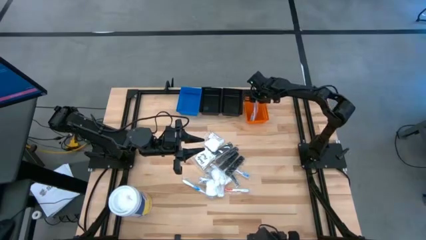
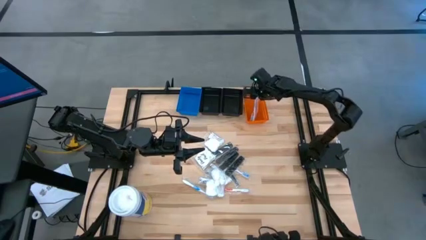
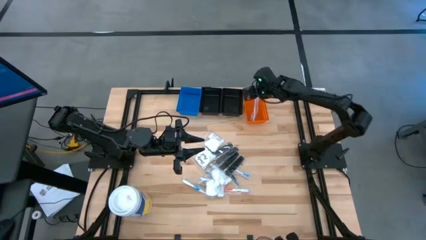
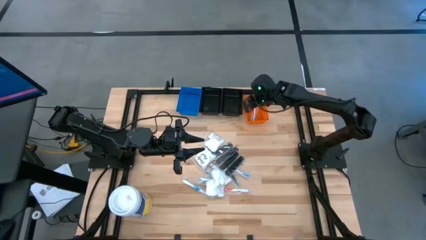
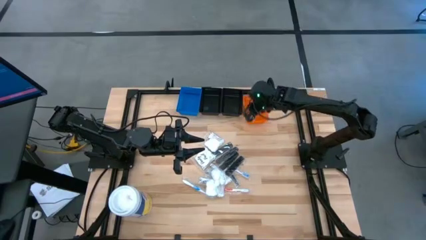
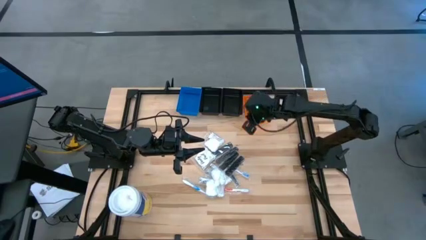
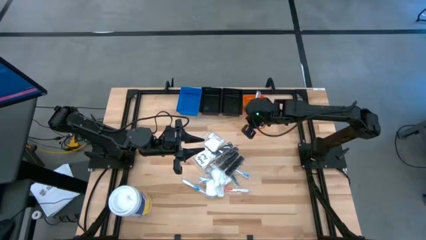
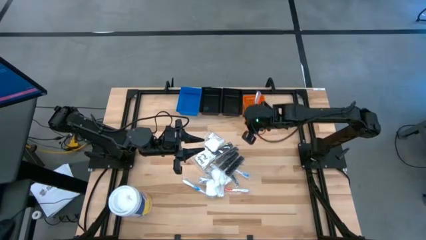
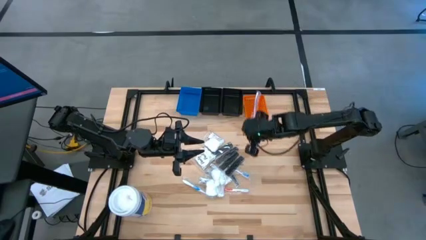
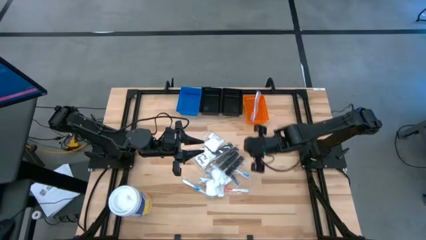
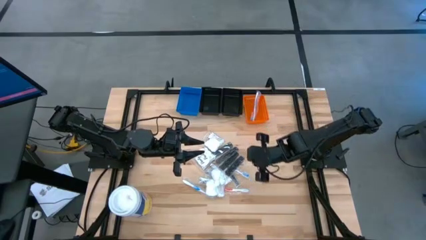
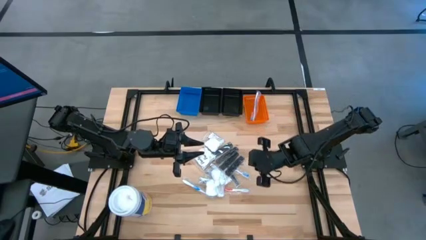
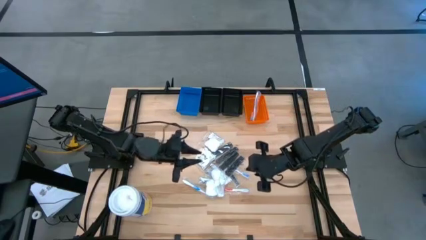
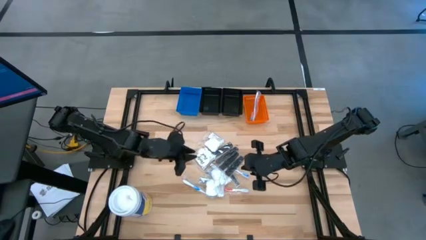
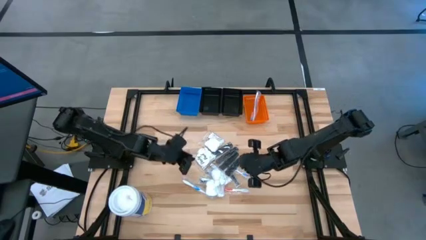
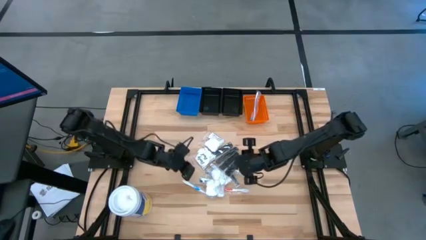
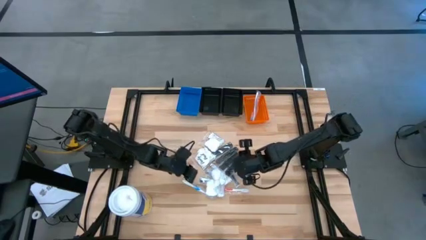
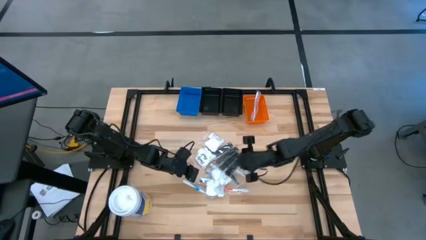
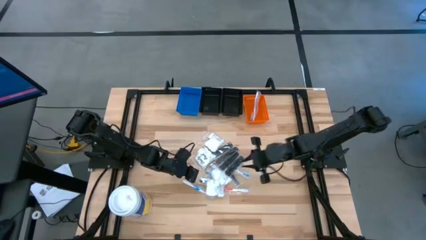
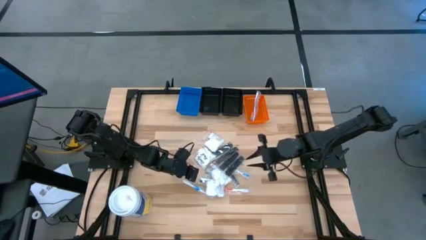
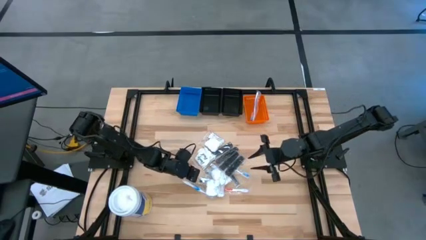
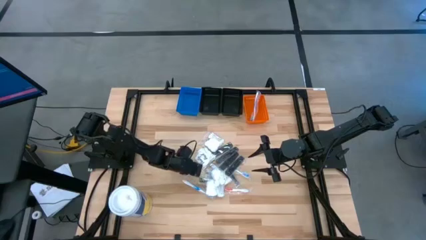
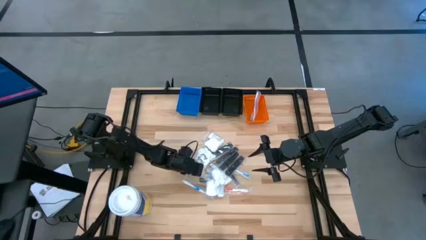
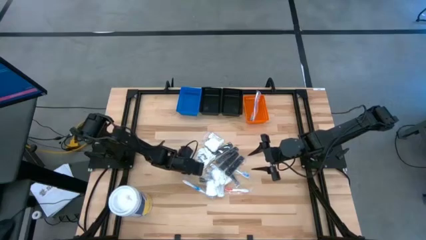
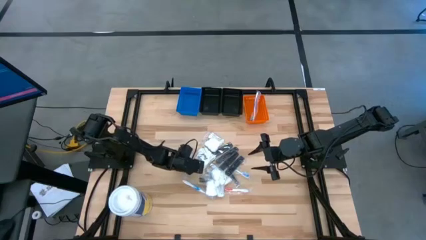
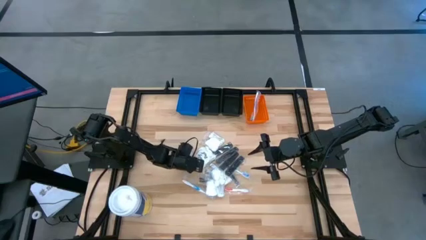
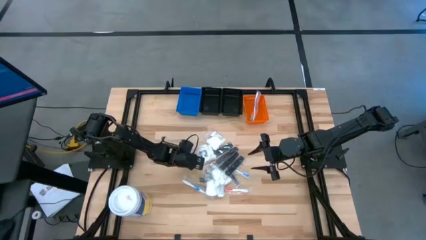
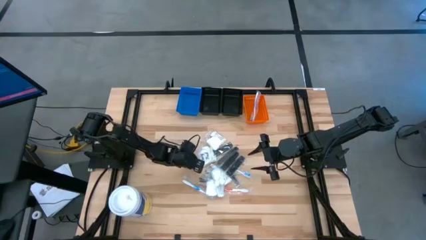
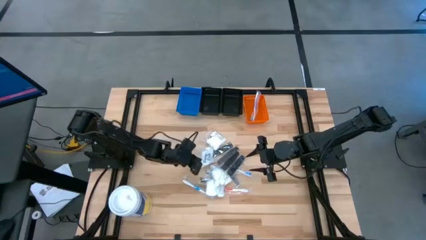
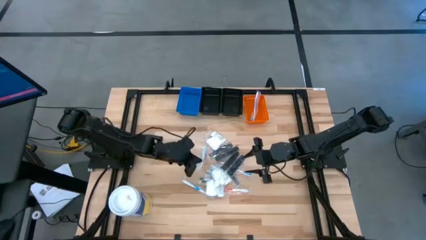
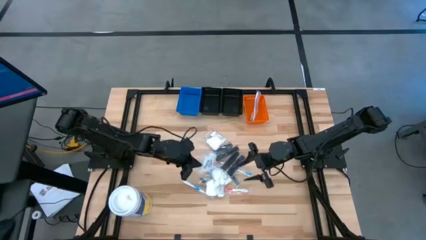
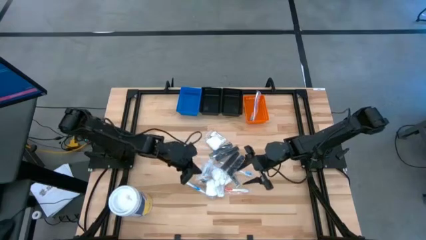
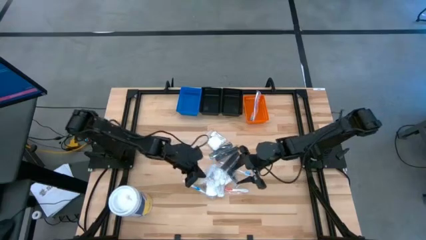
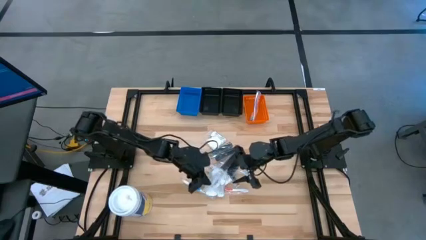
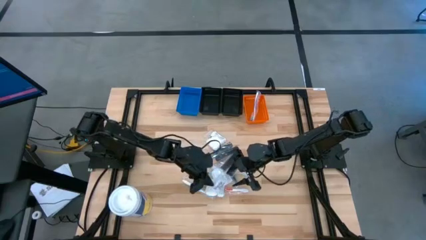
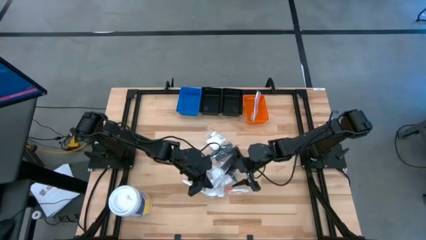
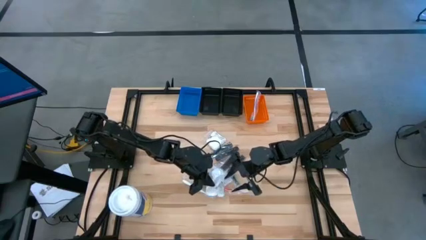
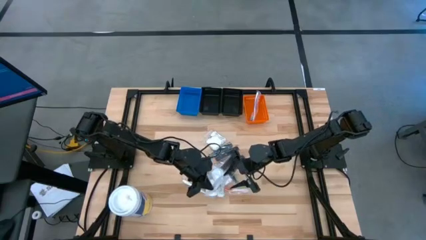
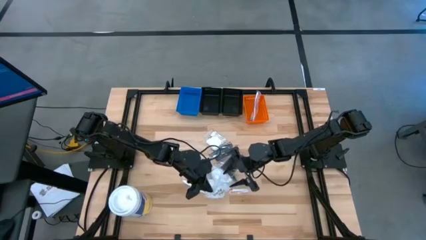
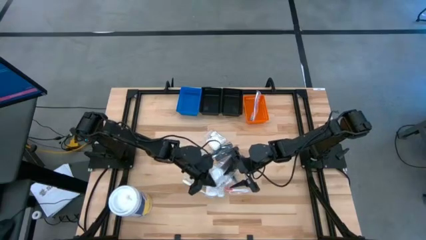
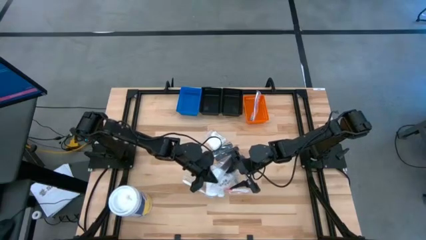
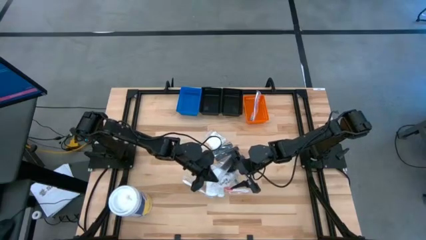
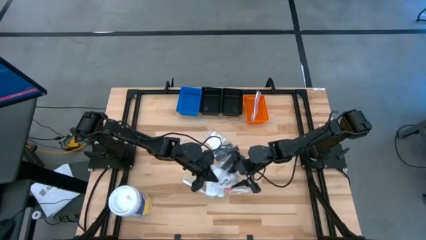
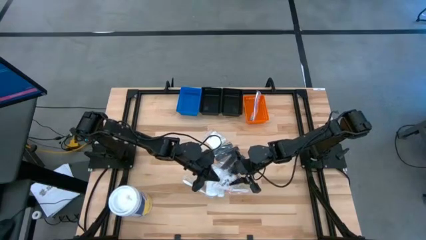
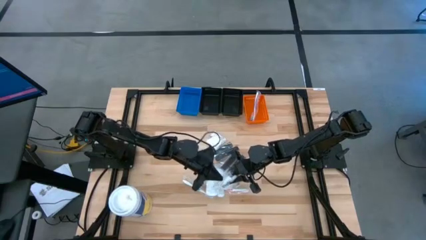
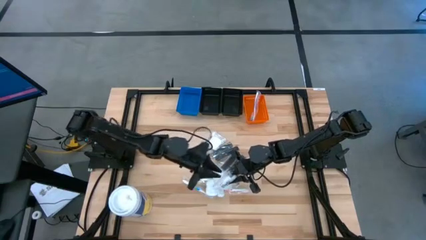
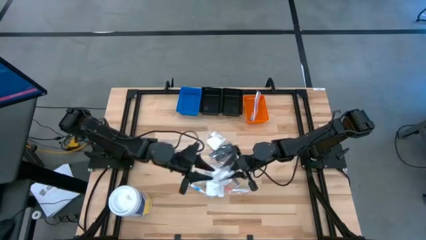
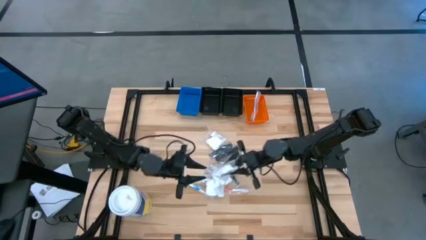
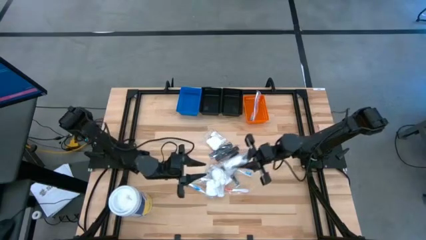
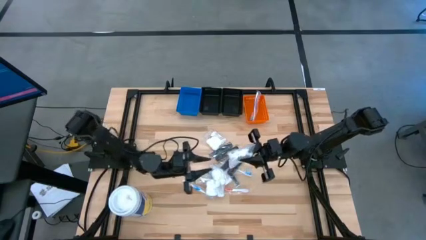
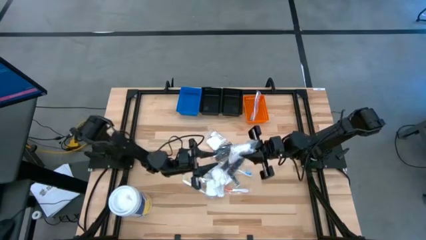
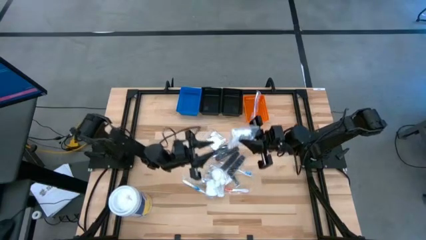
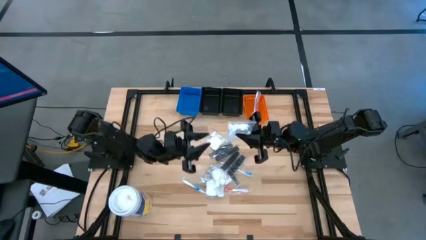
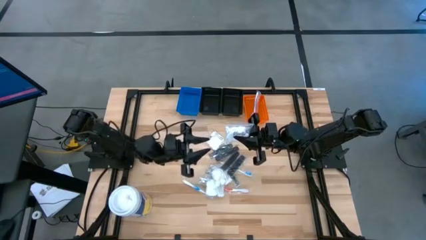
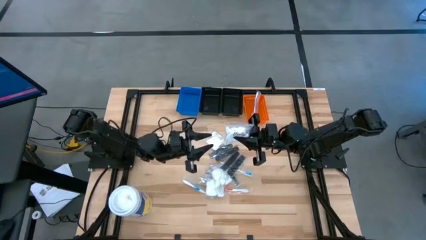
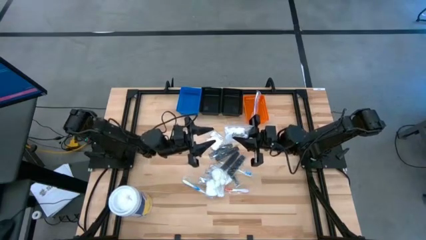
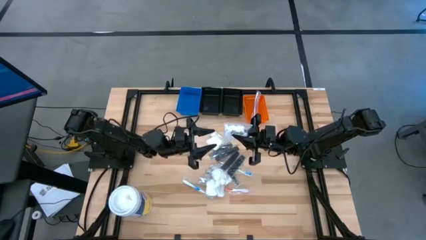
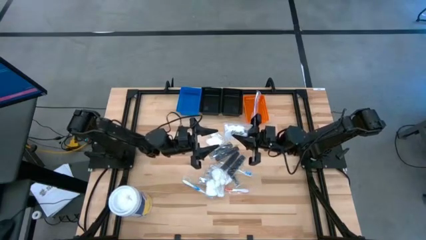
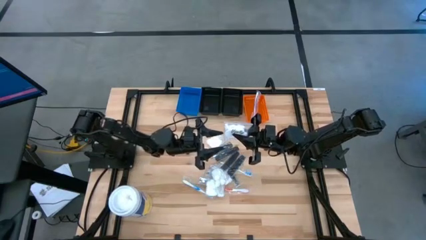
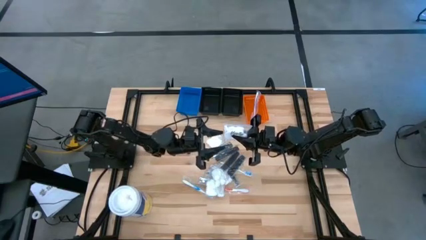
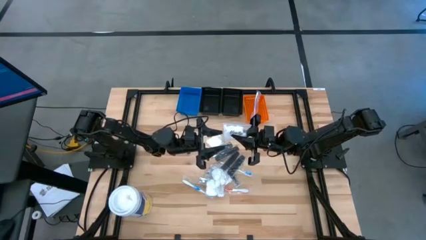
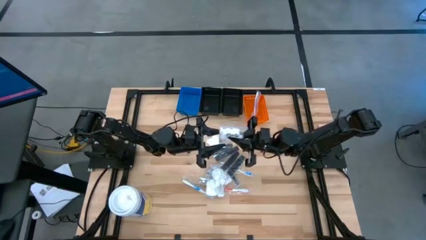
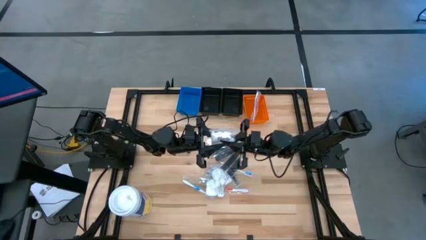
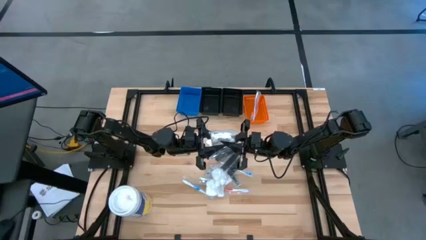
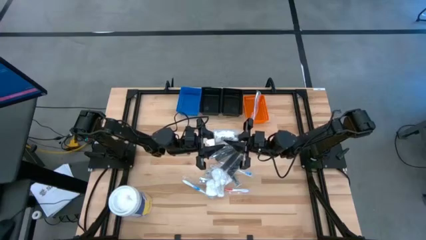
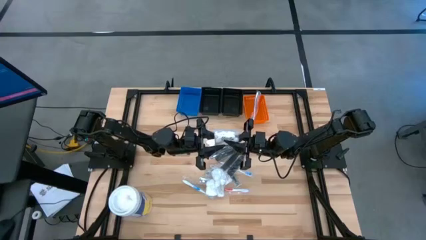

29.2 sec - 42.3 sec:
Task: Pick & Place Travel size toiletries
Put the white vanity pack into the right black bin

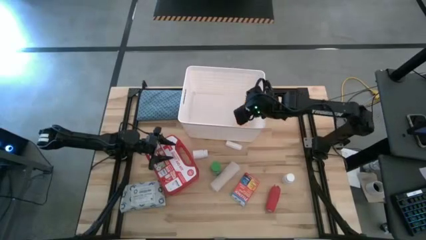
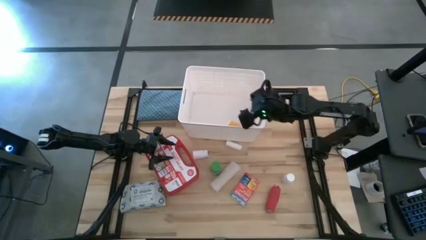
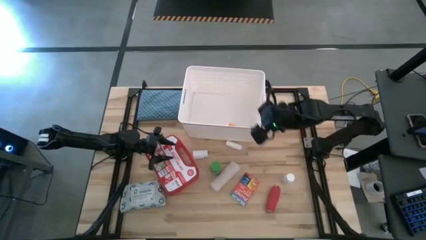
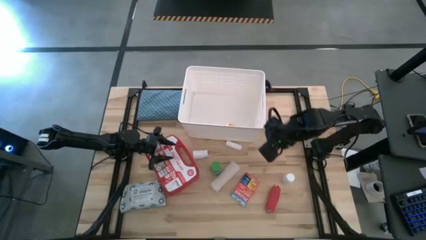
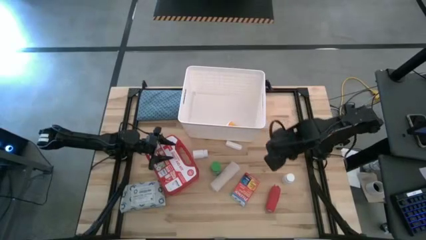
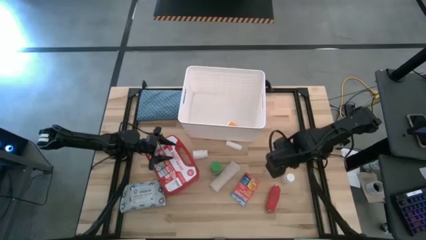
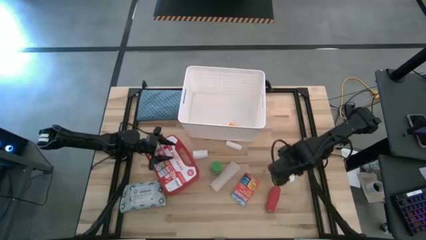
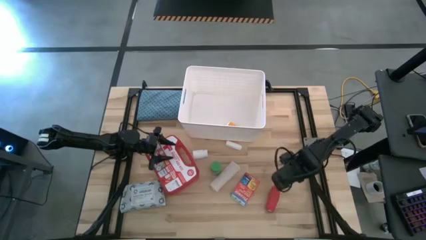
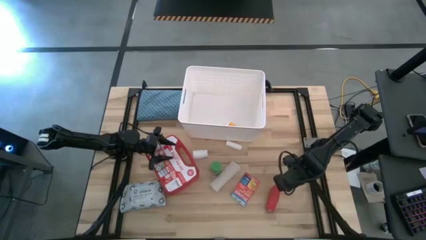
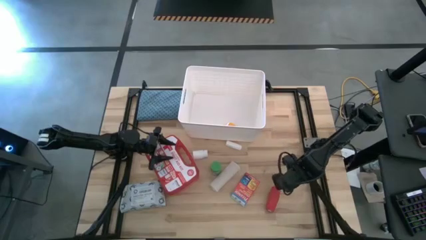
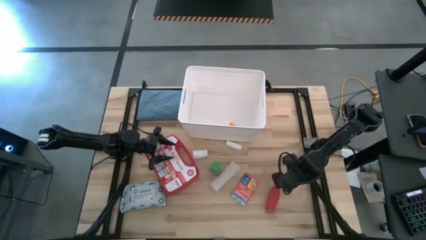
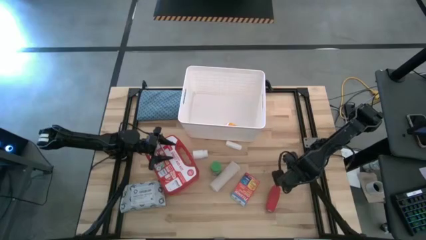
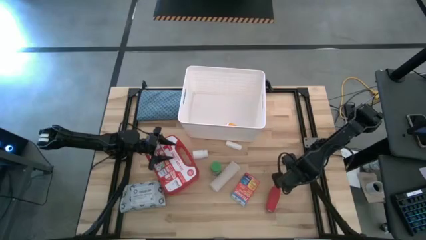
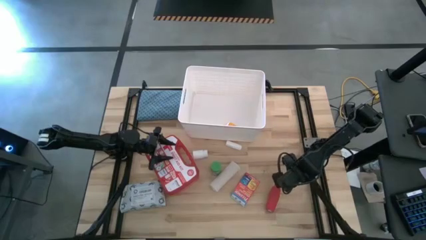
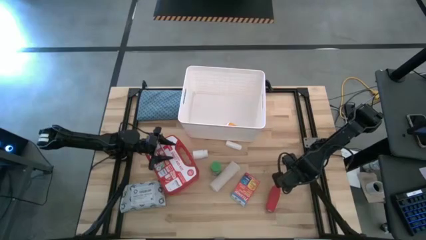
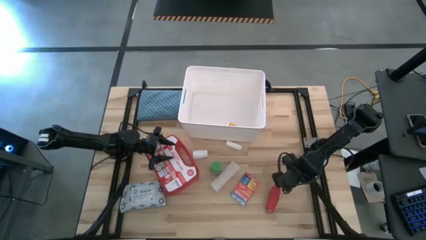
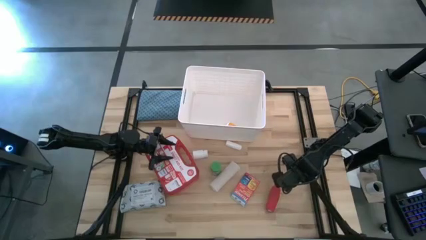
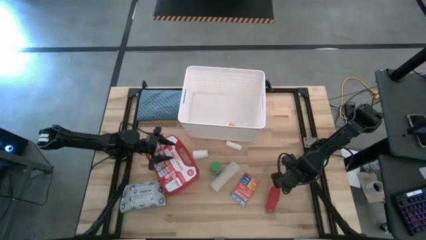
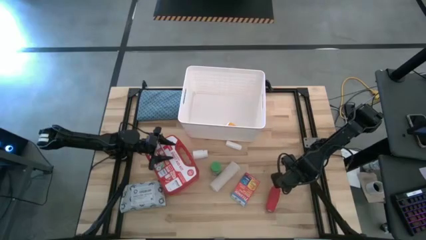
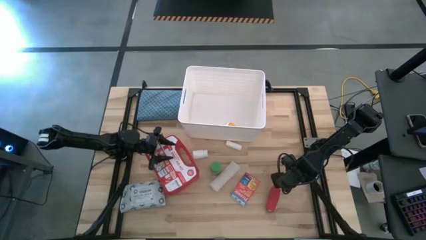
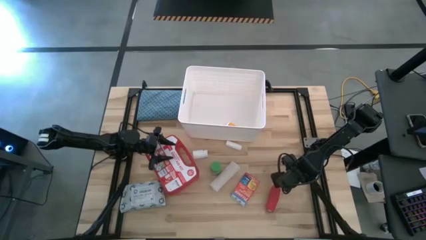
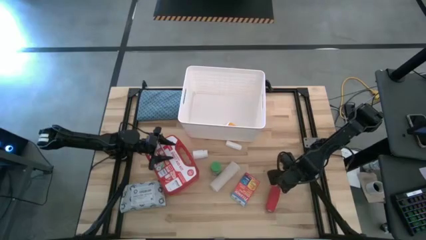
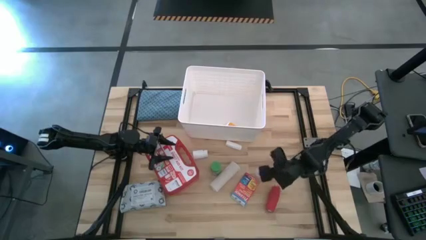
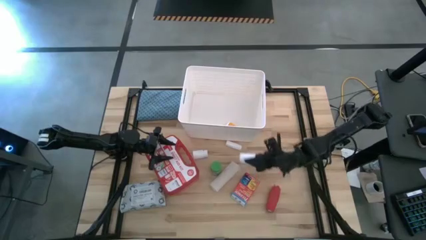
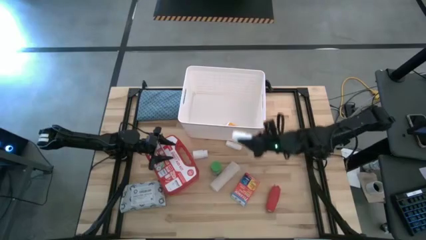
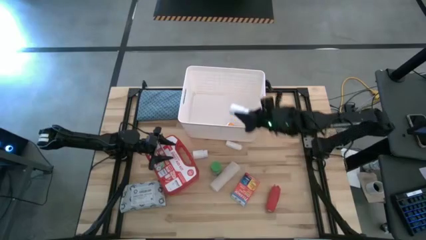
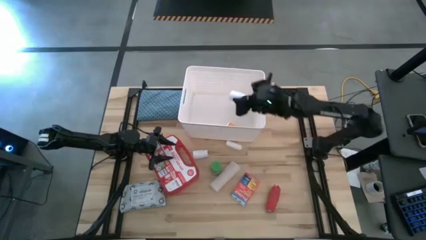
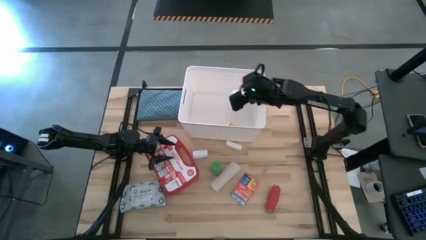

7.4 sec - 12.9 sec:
Task: Pick & place medical supplies in basket/bin
Put the right white pill bottle in the white bin
